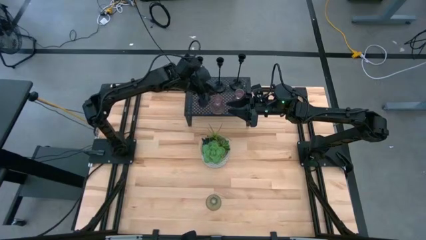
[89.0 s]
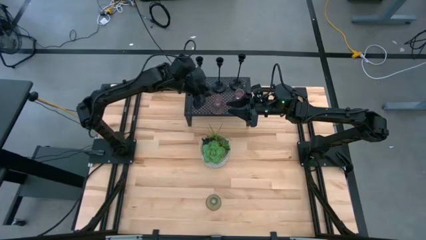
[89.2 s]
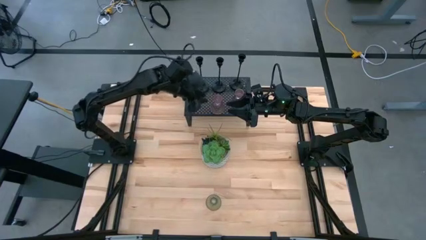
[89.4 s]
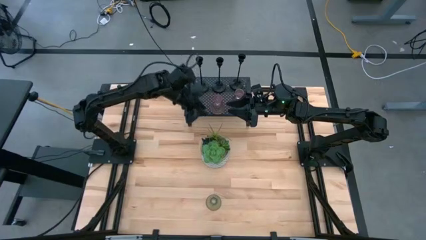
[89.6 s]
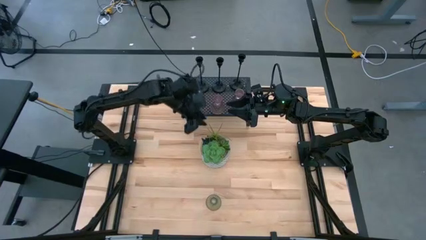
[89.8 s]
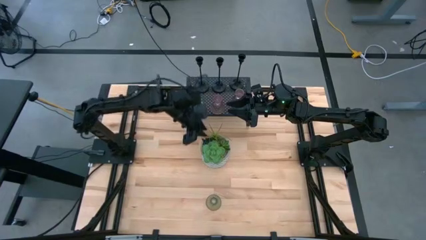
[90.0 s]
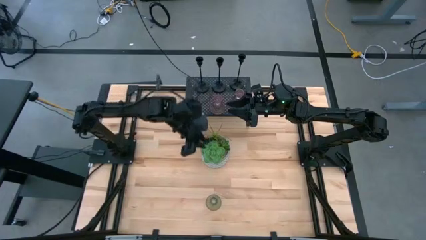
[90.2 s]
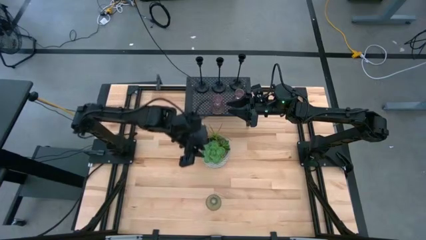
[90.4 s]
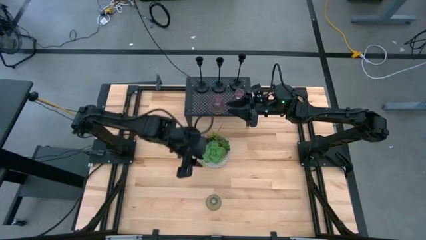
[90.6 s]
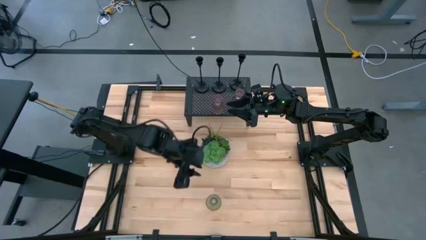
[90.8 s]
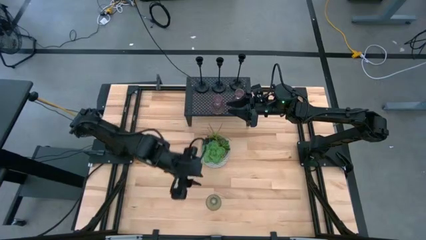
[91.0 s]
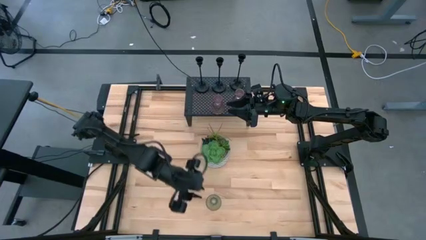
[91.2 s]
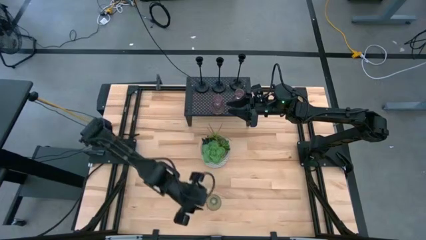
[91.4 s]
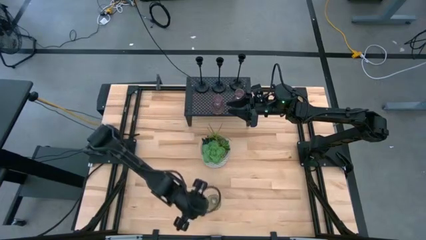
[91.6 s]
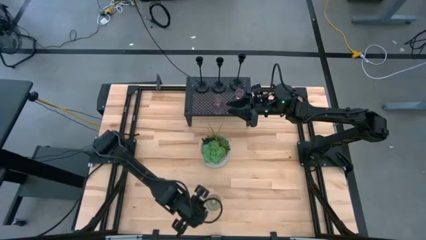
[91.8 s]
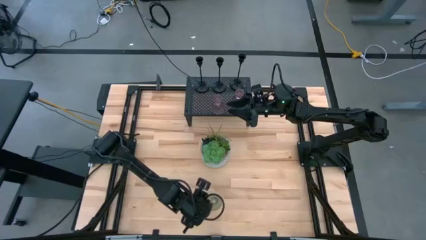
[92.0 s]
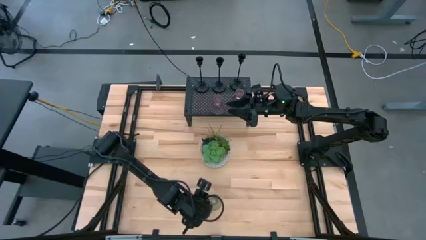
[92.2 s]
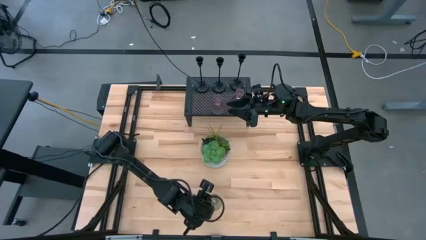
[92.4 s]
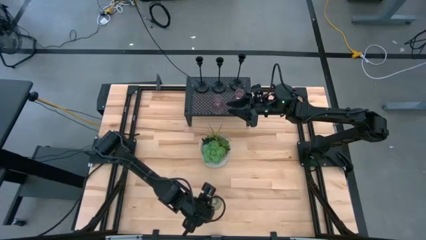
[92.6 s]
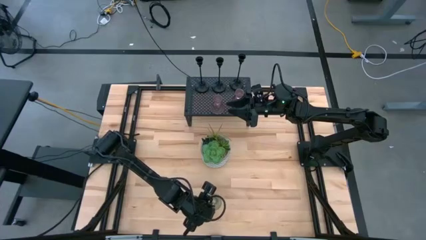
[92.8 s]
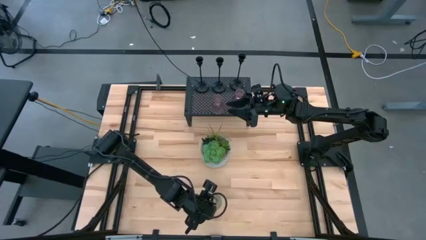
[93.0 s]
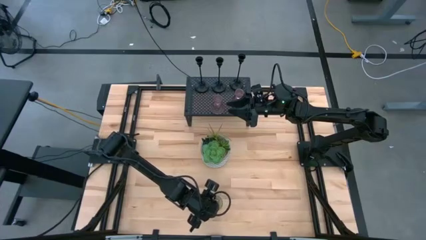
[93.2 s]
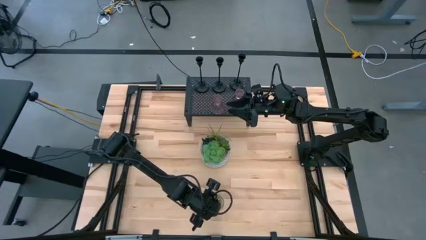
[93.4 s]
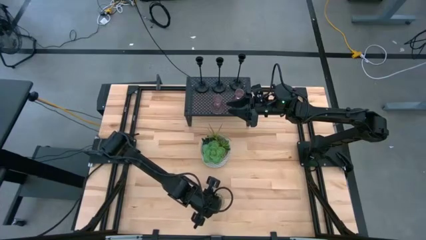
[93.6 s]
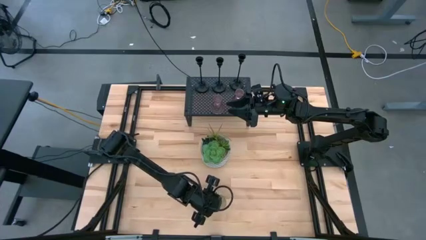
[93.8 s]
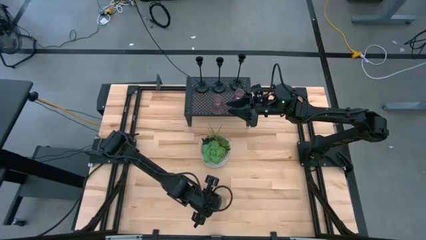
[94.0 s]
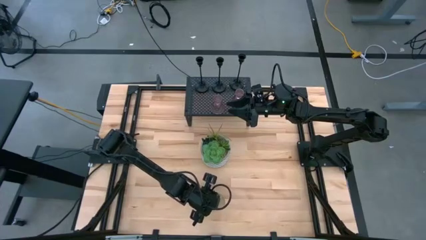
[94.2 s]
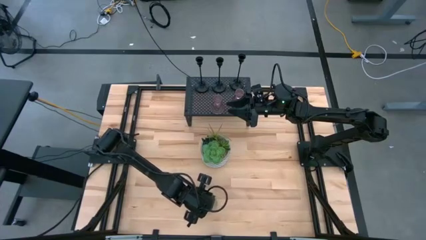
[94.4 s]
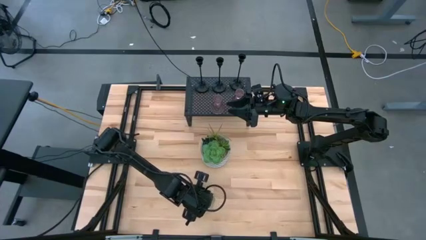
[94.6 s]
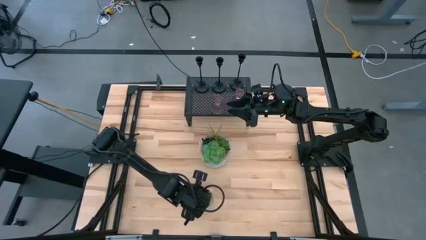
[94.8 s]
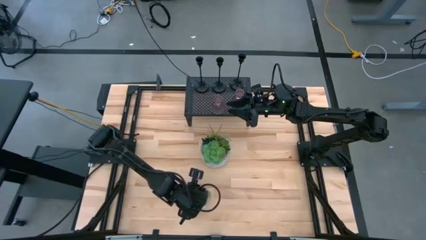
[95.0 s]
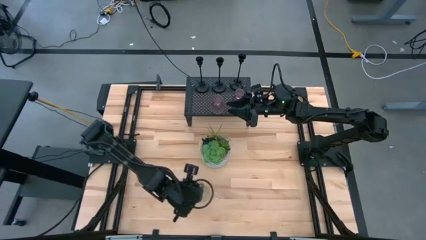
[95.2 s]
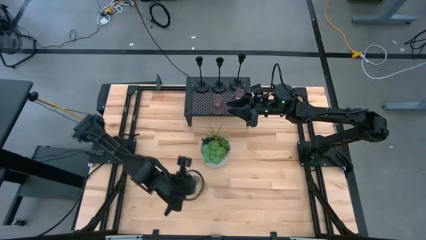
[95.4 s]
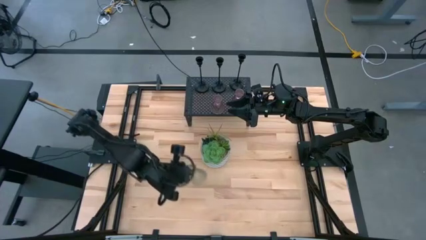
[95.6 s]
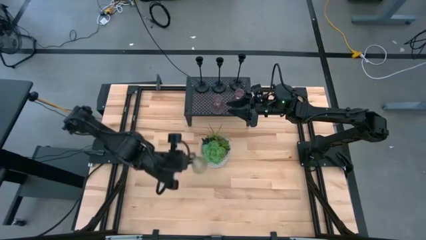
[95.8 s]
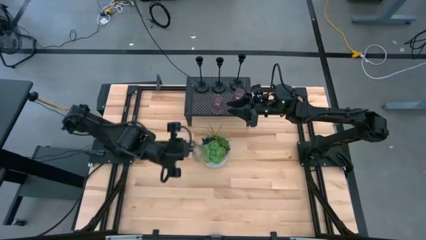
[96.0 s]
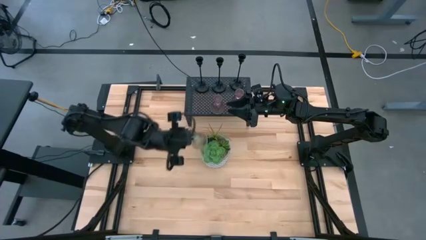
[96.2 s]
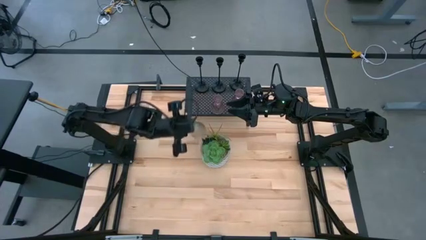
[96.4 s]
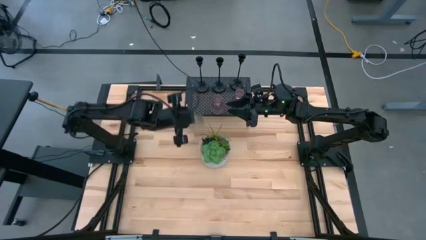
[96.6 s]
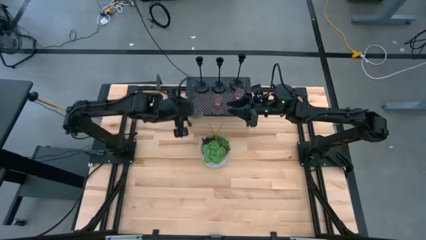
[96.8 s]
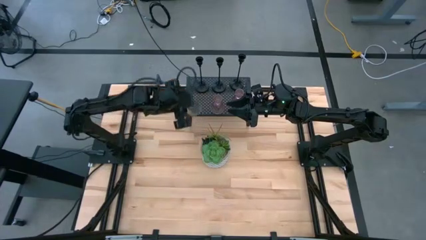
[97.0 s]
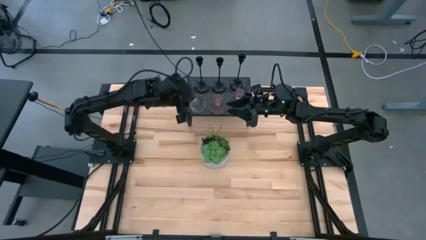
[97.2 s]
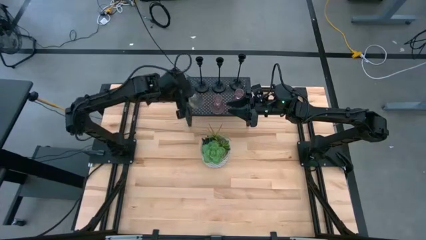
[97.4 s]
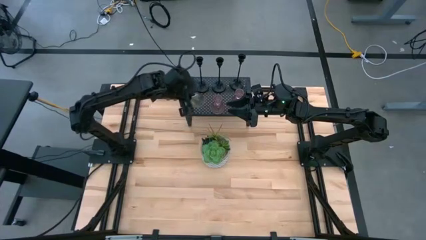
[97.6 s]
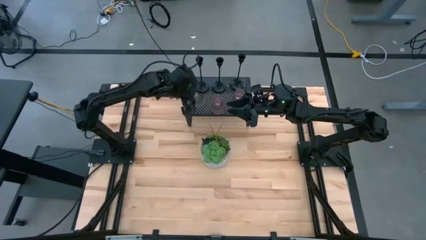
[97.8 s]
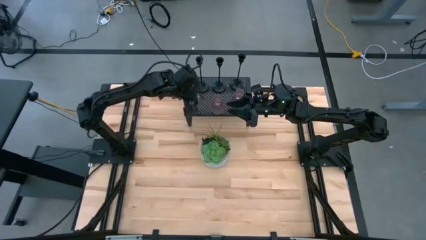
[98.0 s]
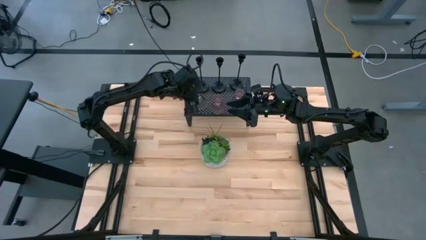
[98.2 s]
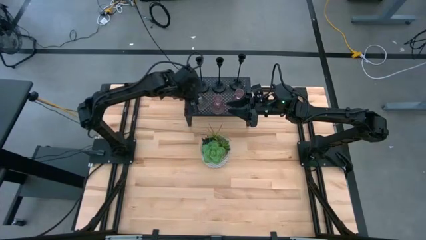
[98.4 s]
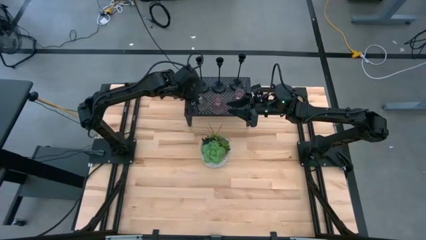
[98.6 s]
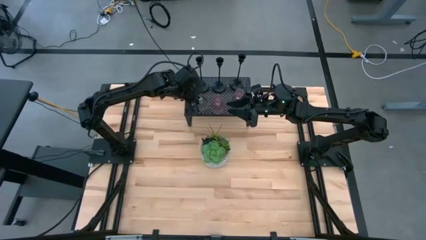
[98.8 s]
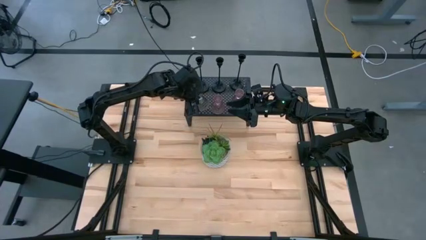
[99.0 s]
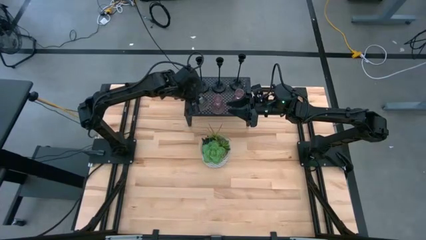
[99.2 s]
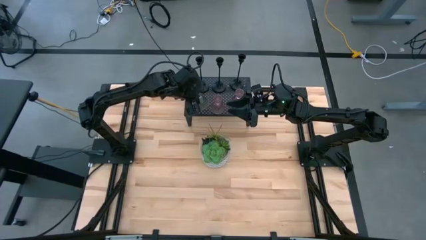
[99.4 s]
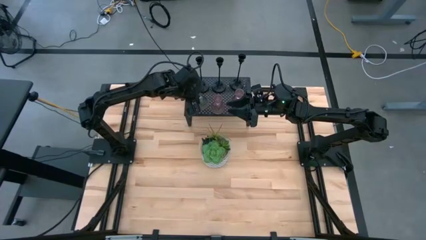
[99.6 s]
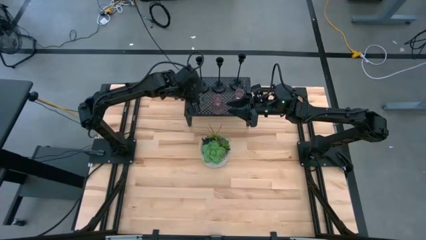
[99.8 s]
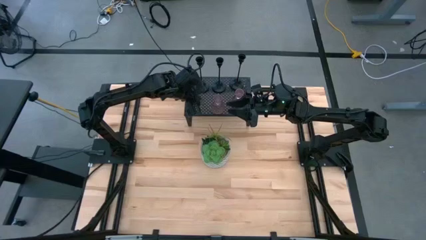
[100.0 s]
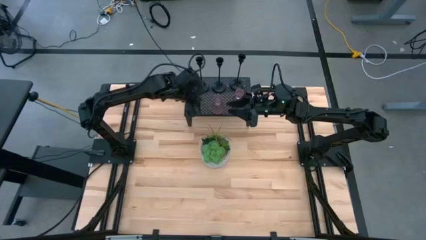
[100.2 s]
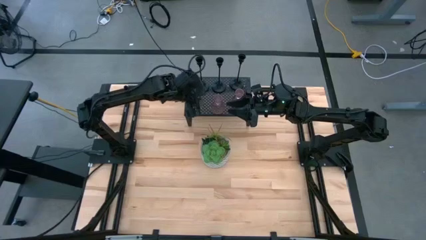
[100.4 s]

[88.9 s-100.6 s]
Task: Pick & Place candle stick holders
Put the green glass candle holder on the shelf aligned with the left black candle holder
